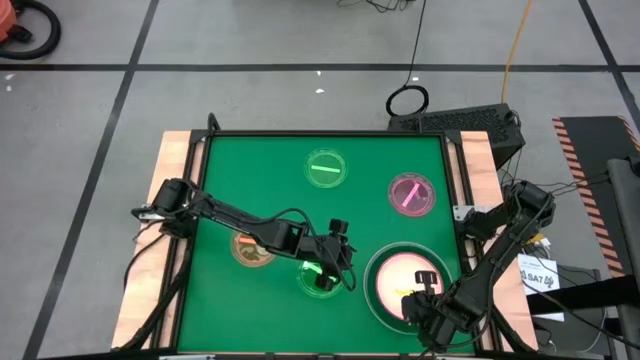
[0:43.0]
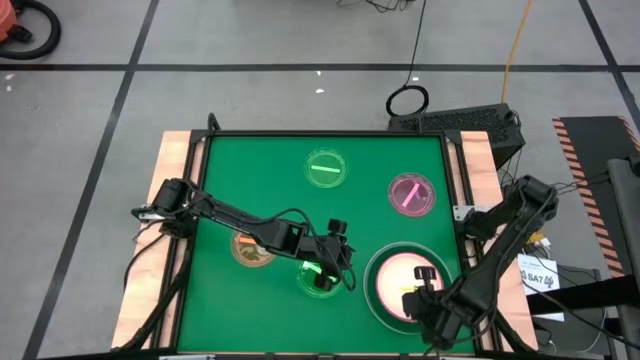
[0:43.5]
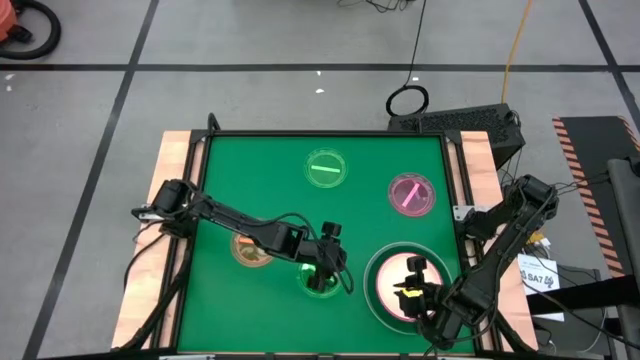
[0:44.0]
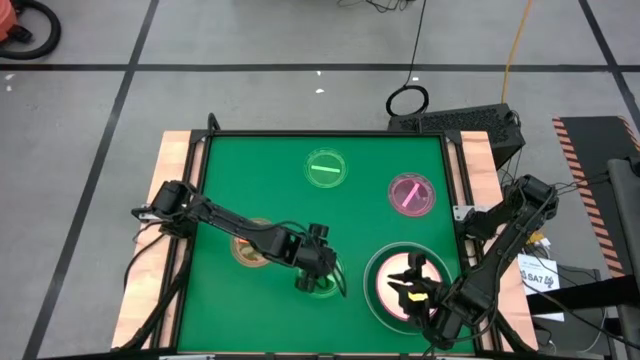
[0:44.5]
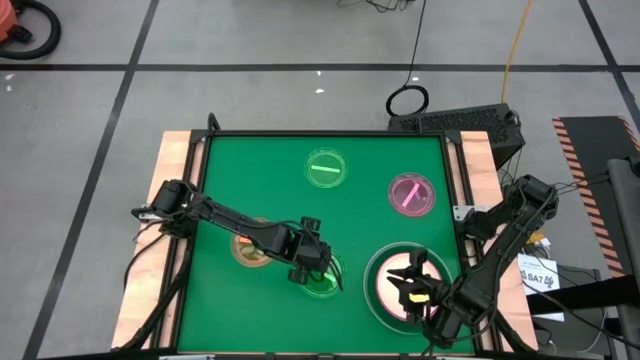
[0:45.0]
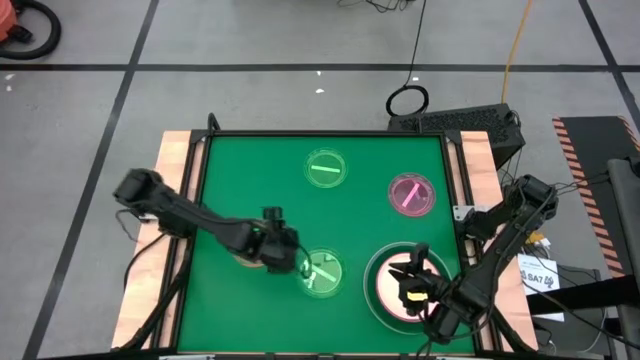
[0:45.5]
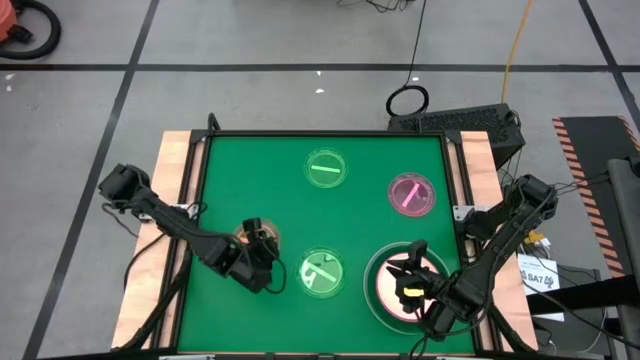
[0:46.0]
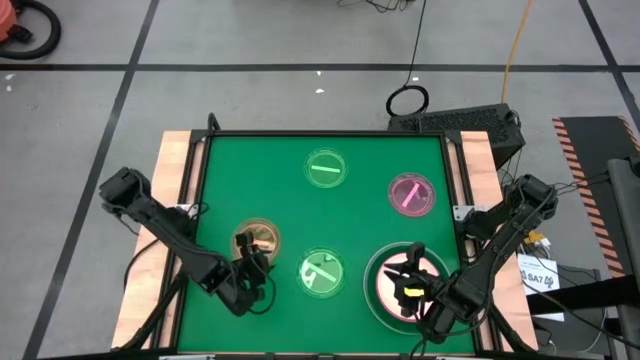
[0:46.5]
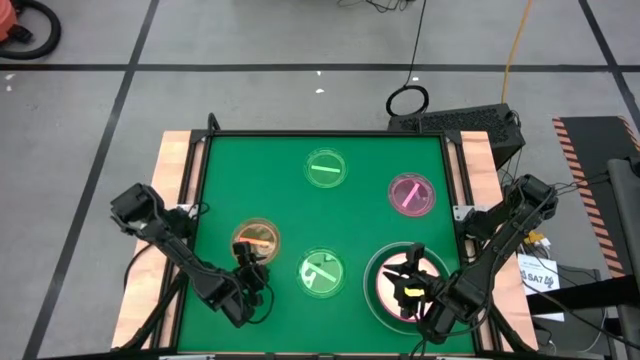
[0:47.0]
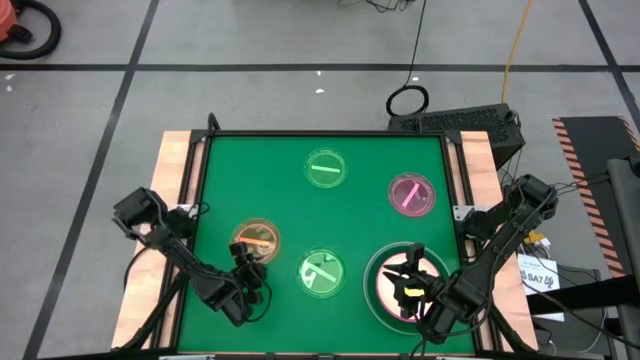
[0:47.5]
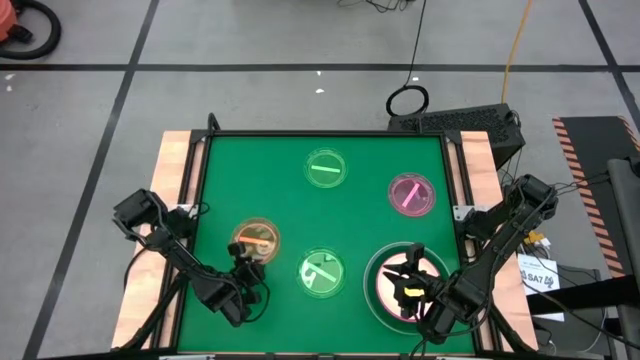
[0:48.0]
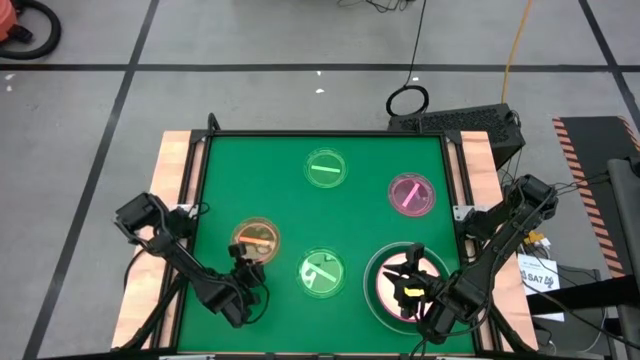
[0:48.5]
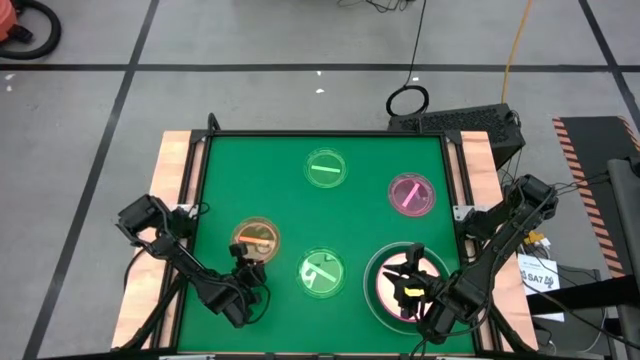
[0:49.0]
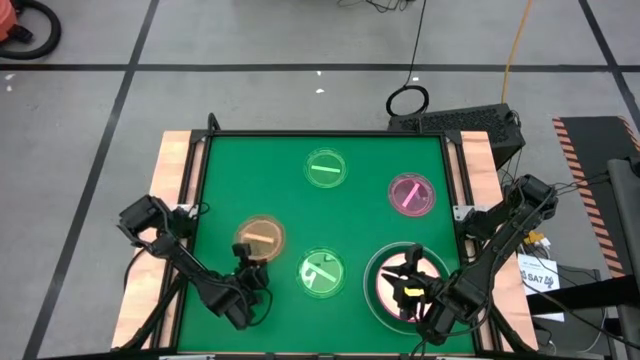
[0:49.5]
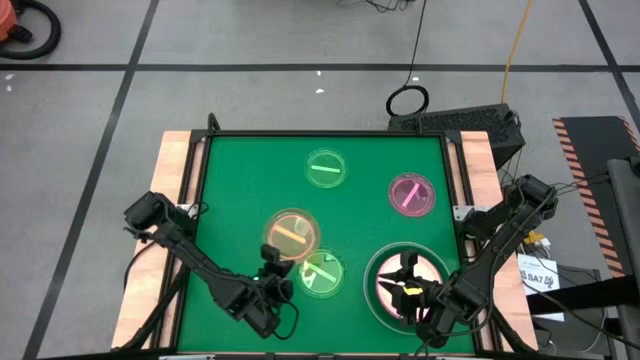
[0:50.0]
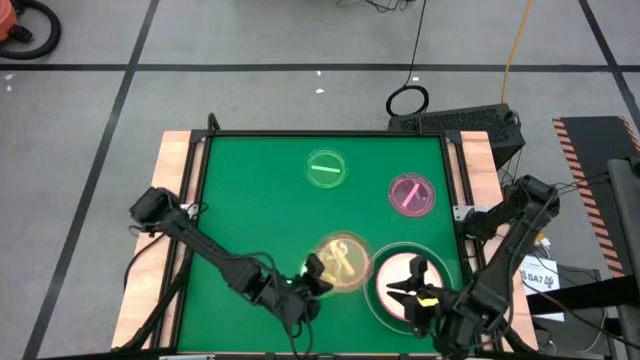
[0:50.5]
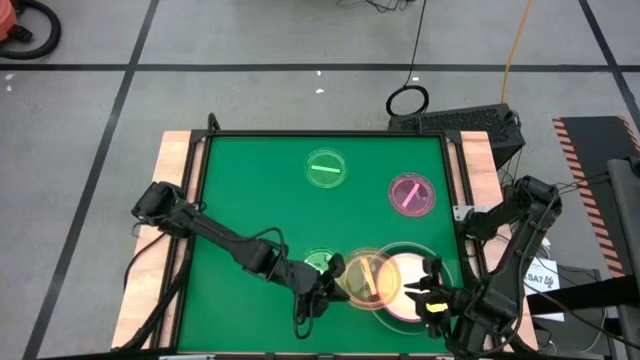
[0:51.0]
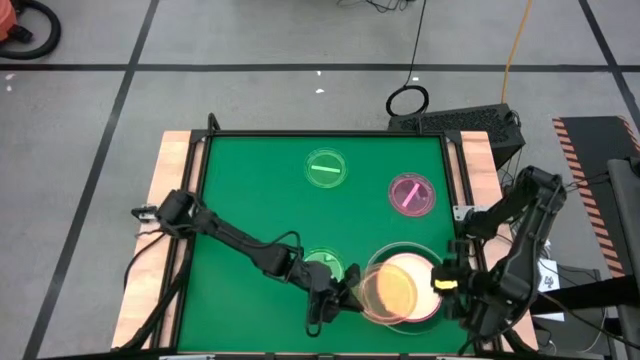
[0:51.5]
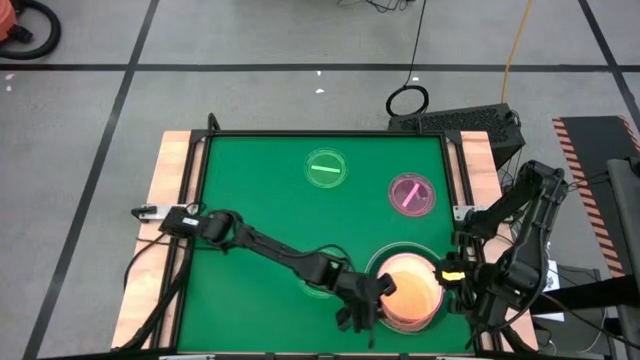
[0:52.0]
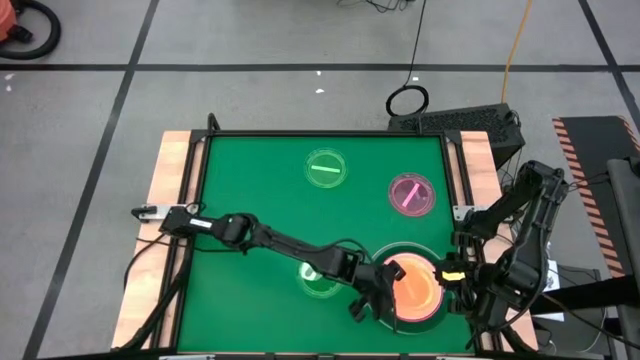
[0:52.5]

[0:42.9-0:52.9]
Task: Stack plastic plates
Stack the orange plate on top of the white plate

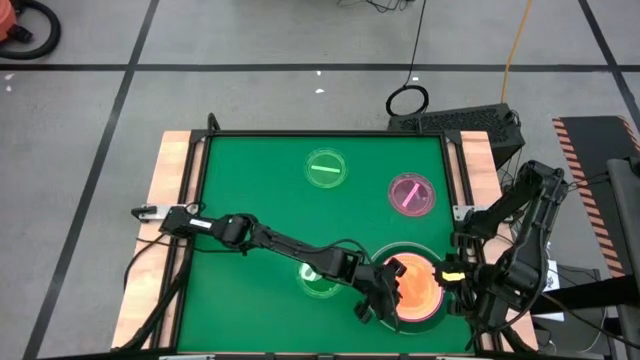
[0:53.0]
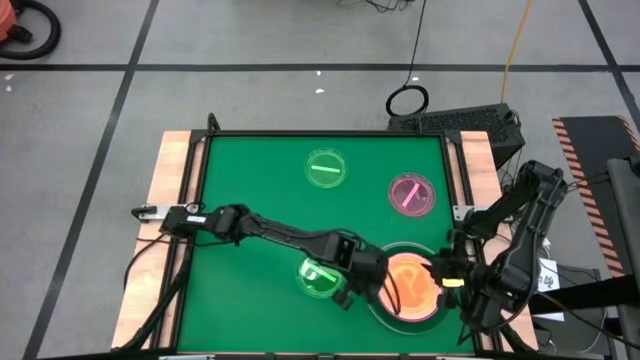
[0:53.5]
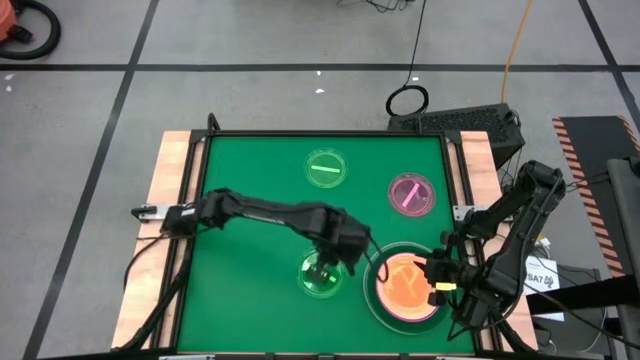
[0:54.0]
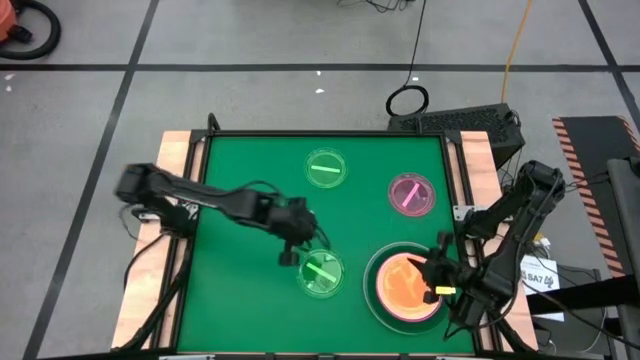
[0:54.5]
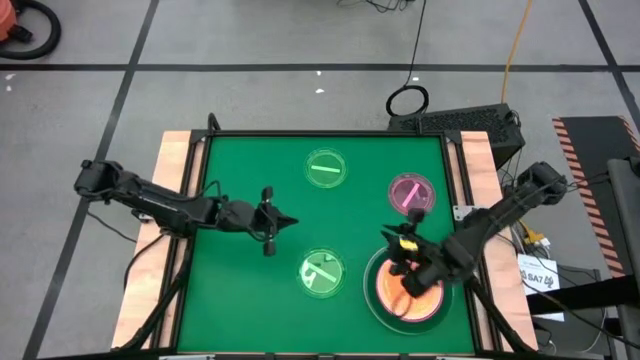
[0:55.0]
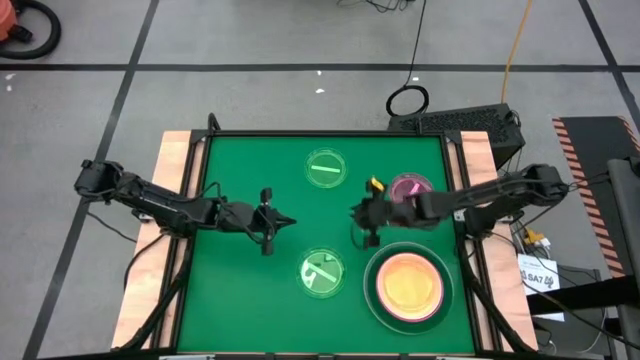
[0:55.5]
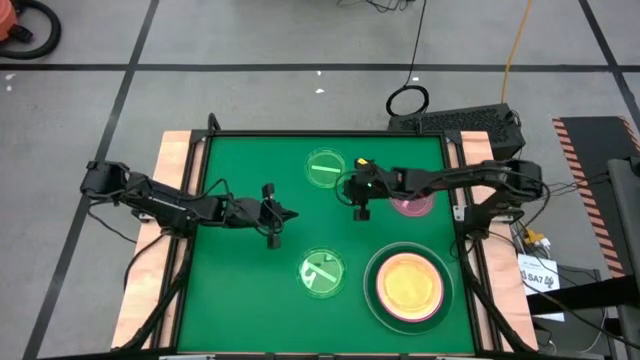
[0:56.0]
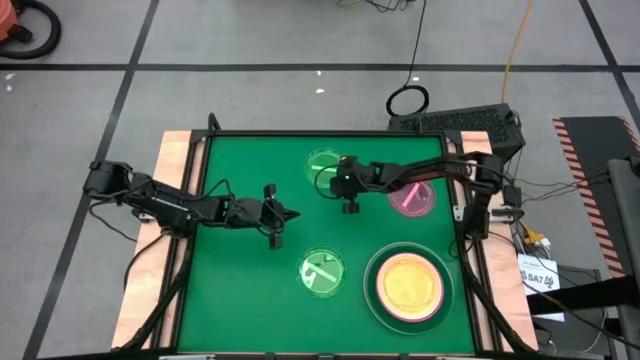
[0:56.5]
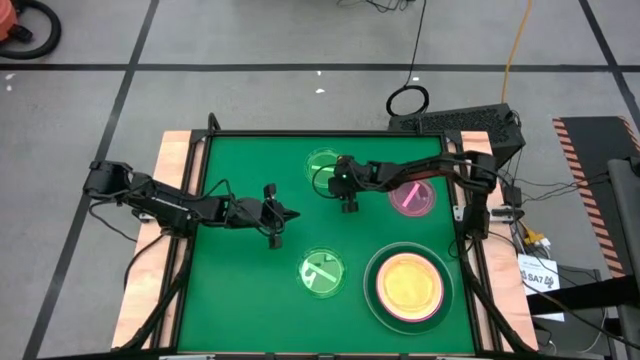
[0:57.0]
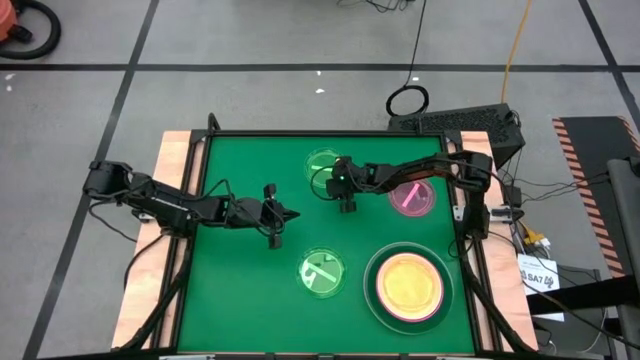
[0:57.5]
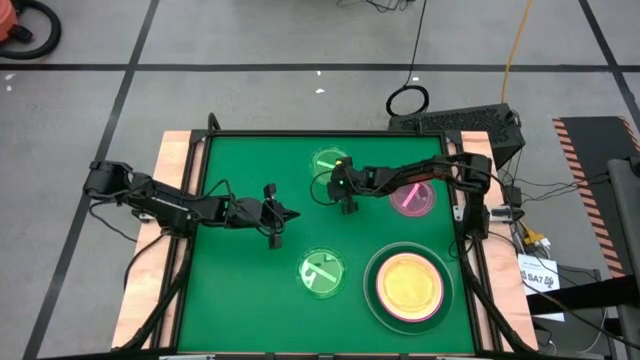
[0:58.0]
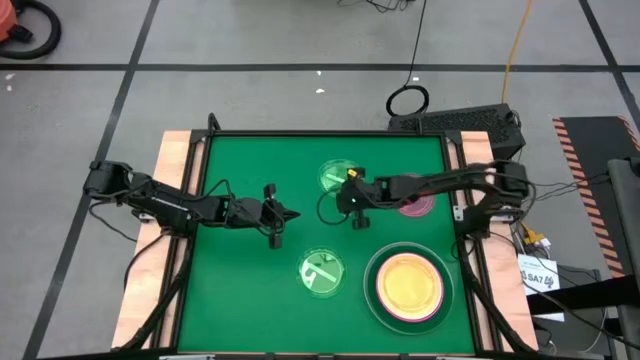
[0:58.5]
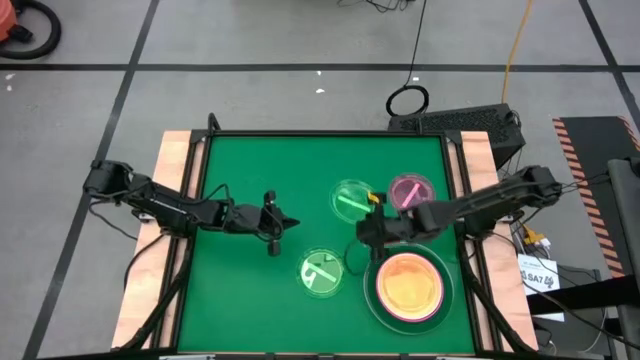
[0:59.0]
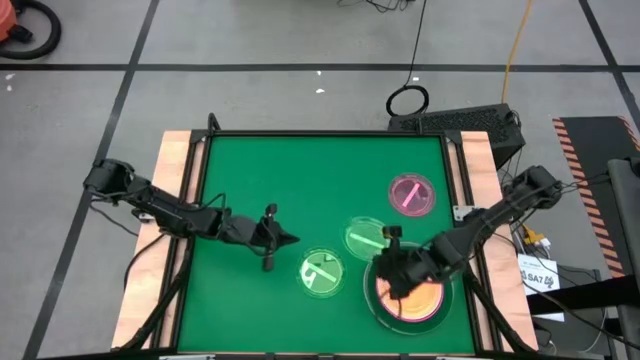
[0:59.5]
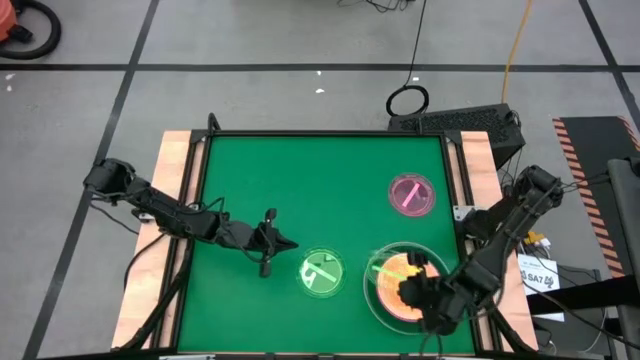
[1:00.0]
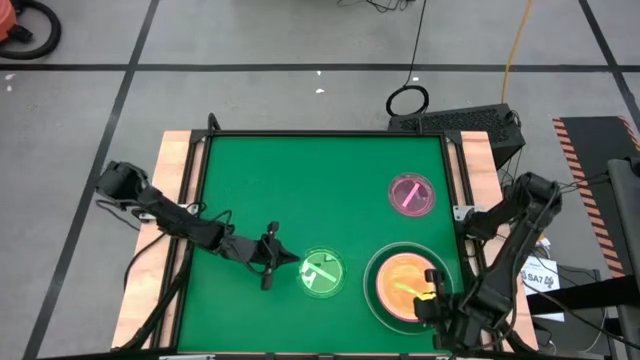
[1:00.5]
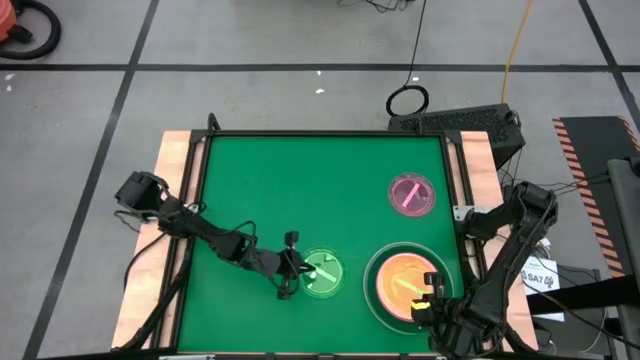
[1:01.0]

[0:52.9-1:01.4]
Stack the top green plate on top of the orange plate

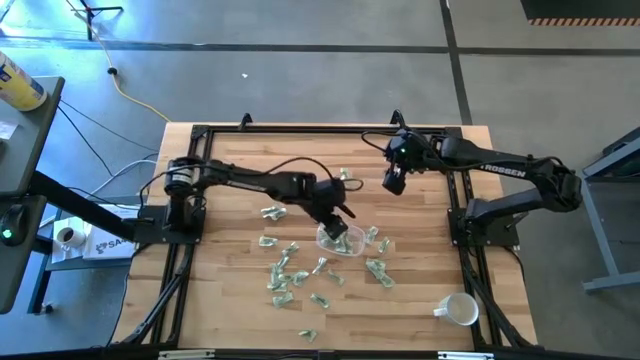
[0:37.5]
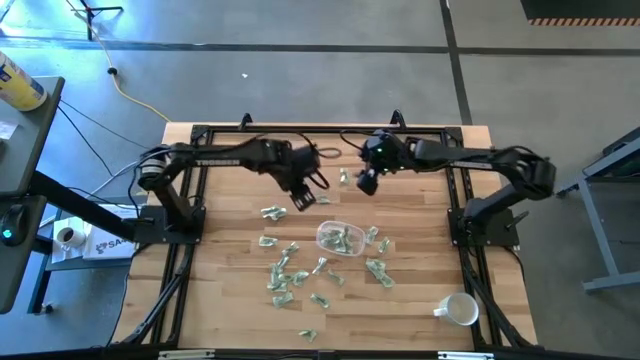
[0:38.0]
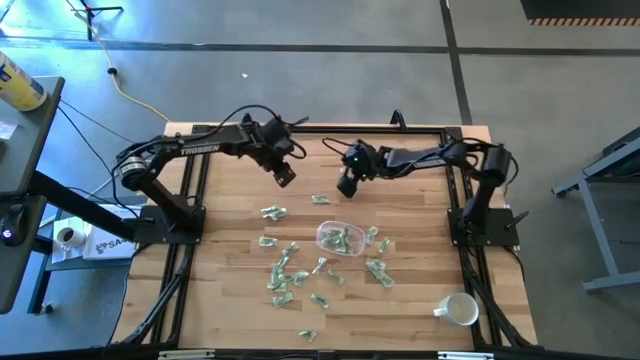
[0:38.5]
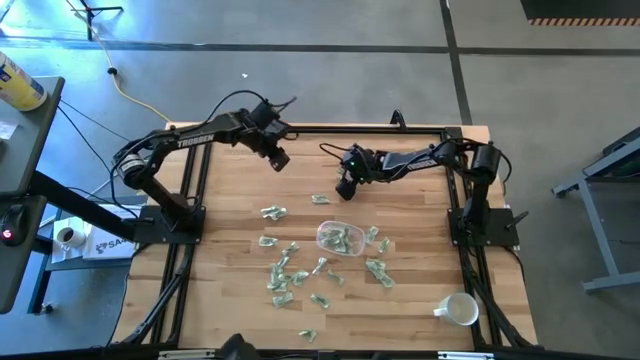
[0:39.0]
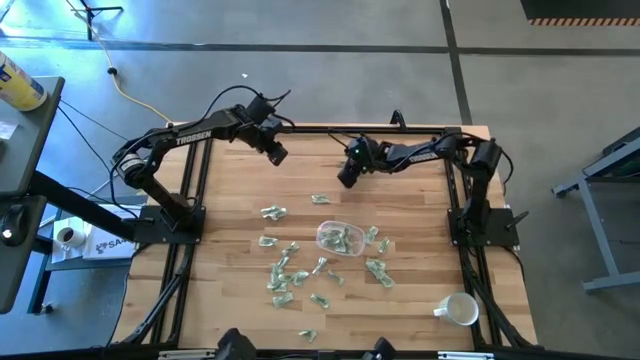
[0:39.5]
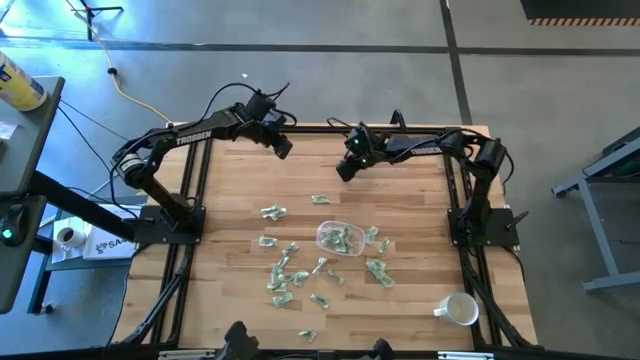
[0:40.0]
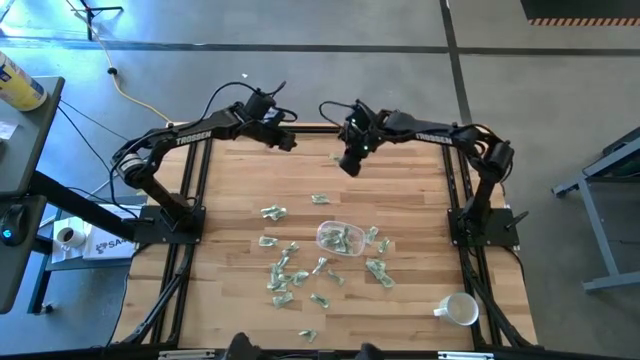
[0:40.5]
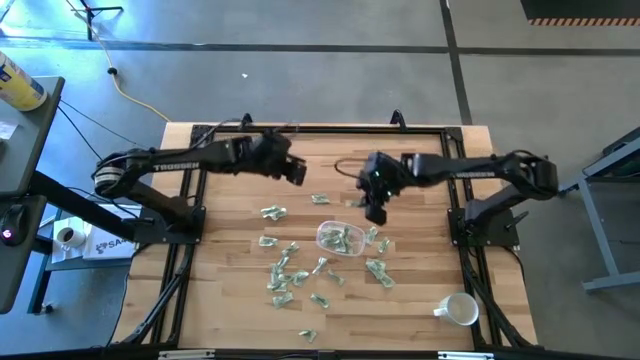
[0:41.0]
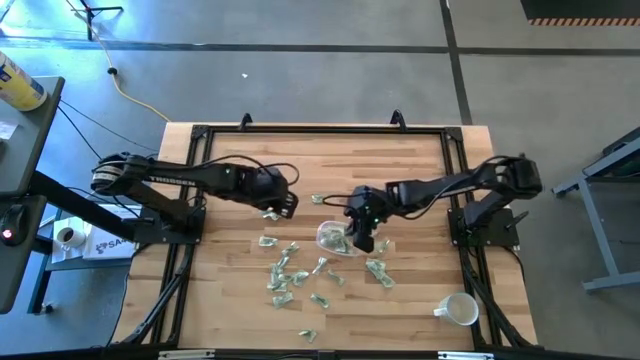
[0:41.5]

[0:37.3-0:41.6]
Task: Pick and place Stevia / Truvia into bins
Put the green stevia packet into the transparent container
